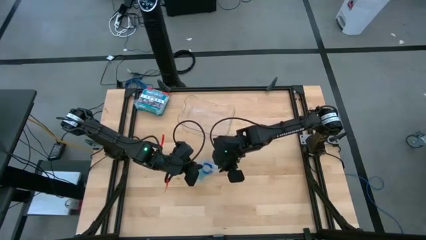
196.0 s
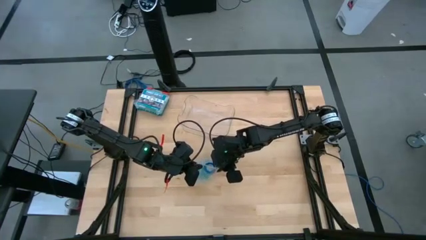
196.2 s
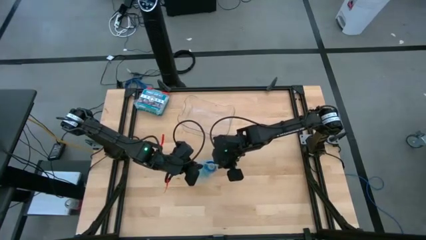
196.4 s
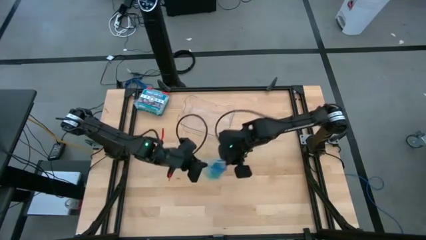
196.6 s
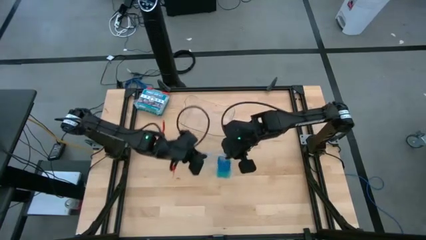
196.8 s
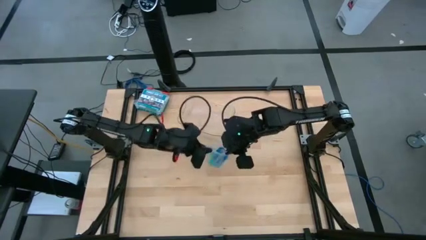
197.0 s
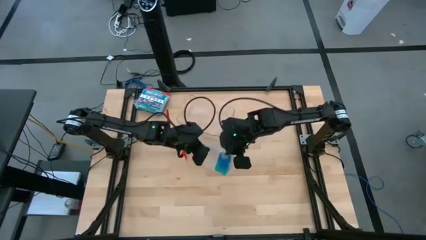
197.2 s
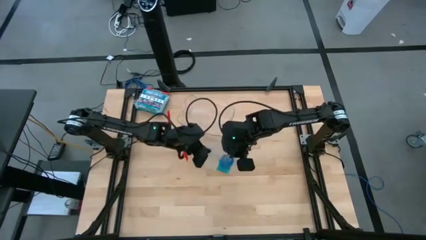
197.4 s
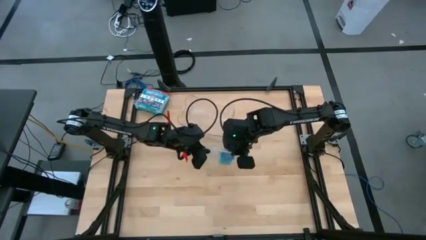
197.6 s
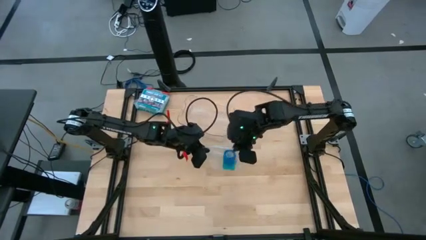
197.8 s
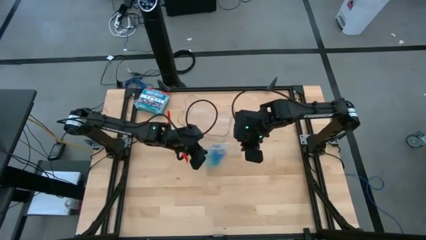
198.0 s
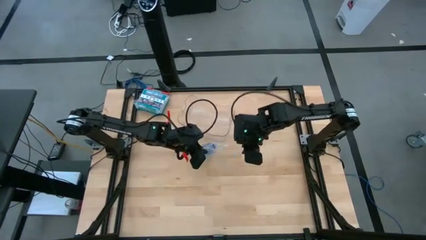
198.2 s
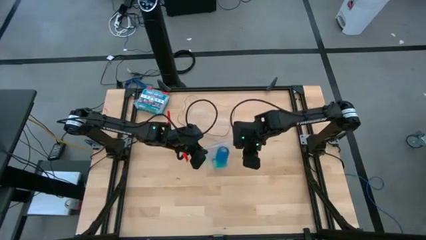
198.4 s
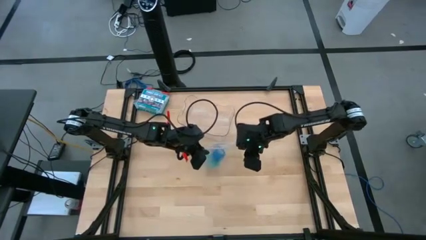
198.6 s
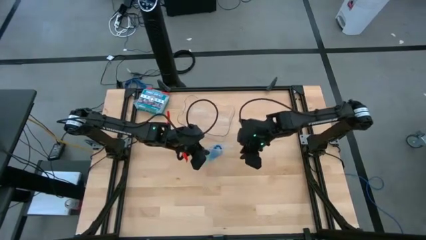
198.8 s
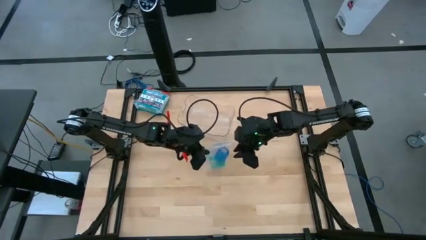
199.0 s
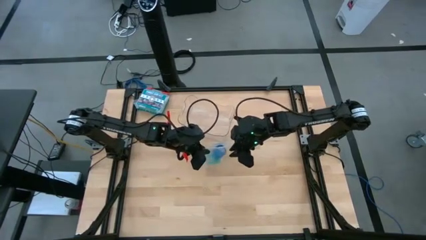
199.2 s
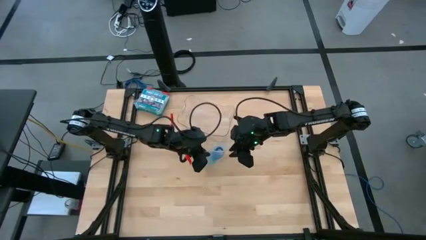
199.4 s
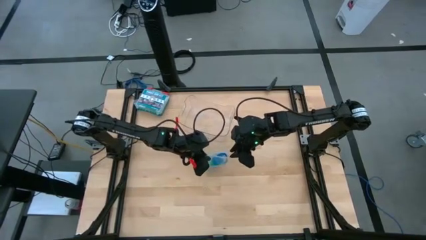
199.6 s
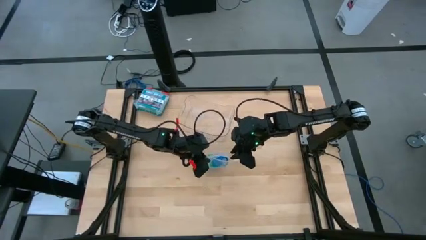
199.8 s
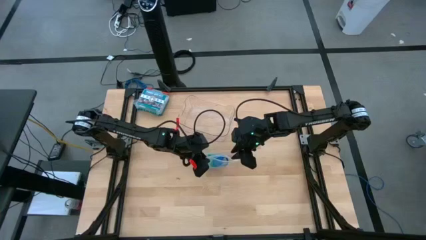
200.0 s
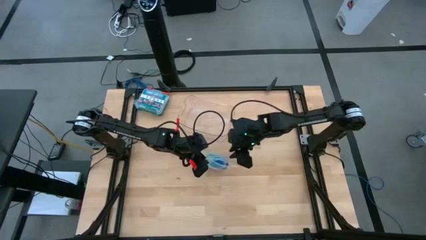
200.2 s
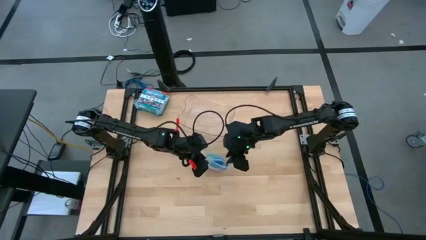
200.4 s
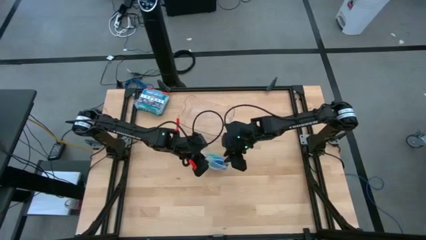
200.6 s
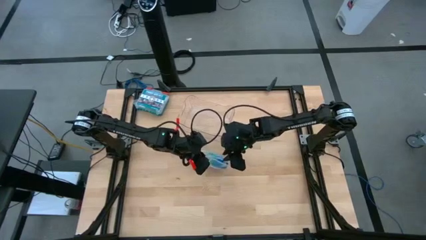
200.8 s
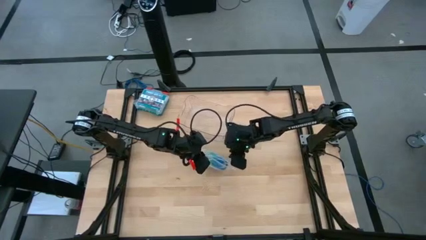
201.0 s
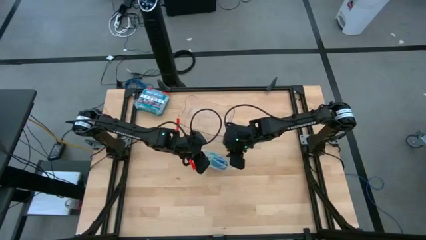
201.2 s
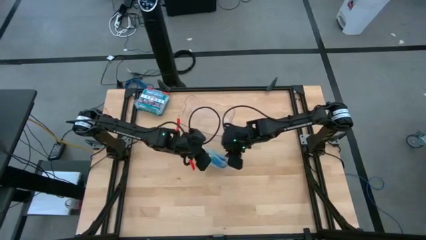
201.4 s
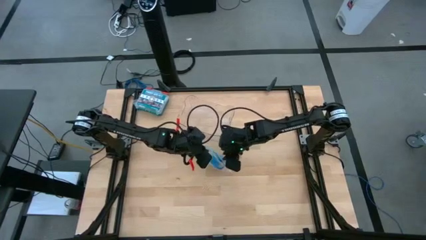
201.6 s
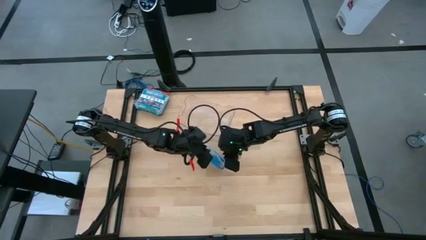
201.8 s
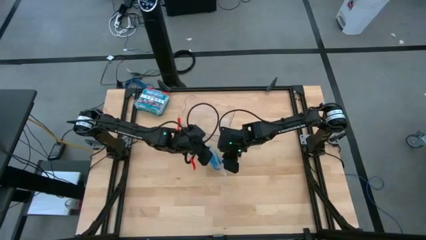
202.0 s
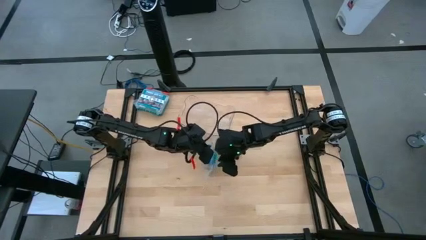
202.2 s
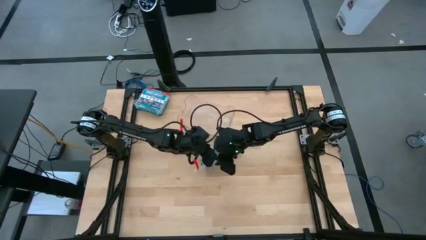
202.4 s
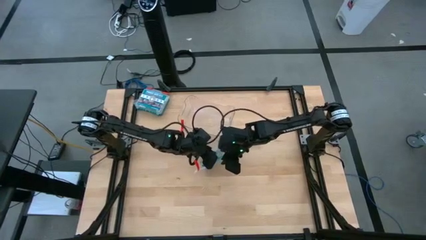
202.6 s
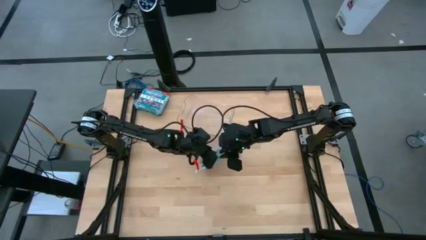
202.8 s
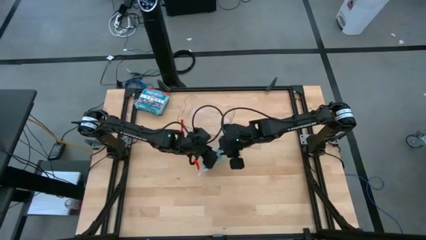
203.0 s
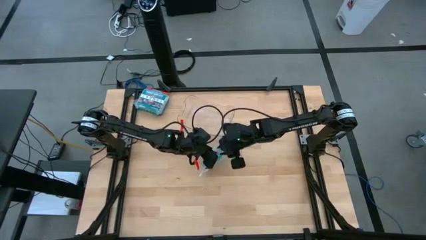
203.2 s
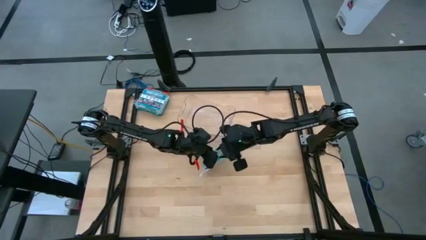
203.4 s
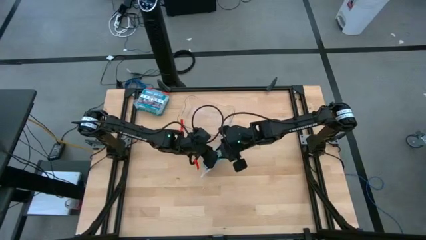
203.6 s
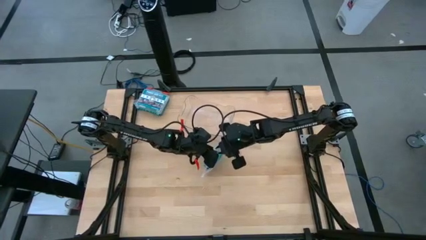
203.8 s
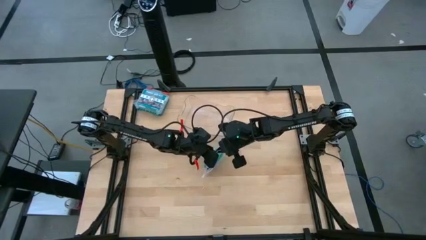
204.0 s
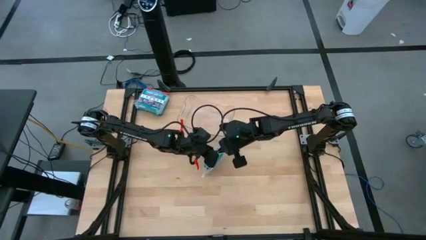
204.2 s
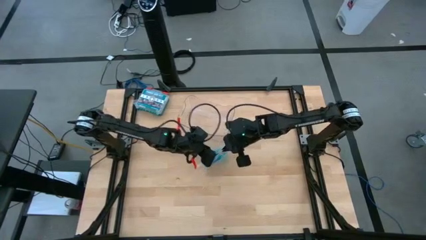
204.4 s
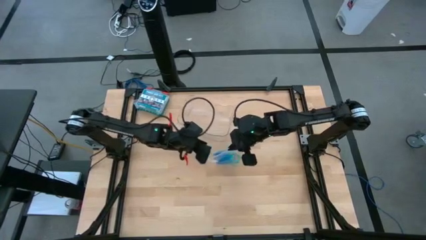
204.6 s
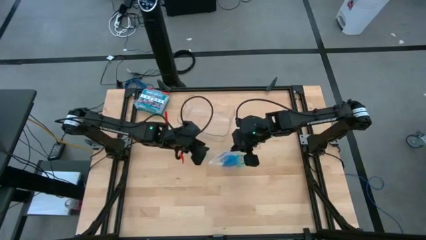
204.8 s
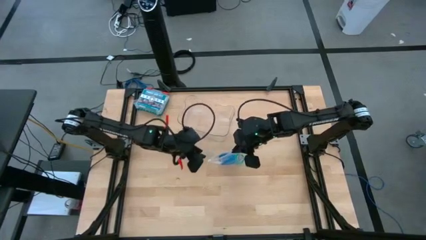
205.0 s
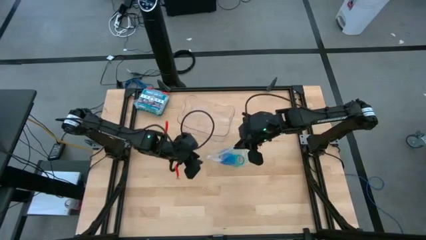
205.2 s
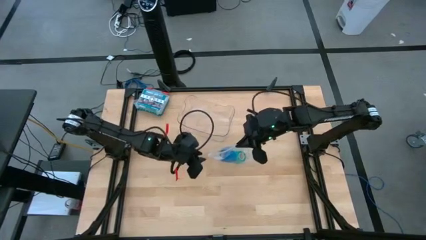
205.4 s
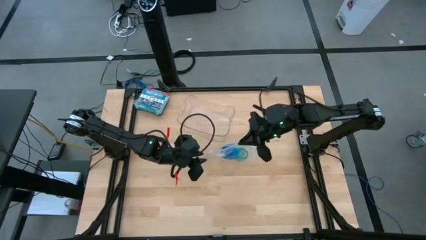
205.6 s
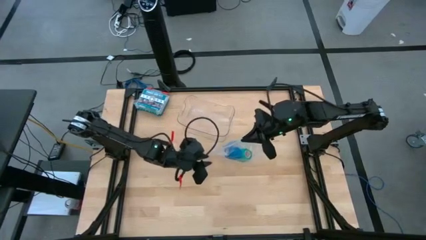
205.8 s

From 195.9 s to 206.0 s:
Task: Roll bandage
Close the transparent zip bag

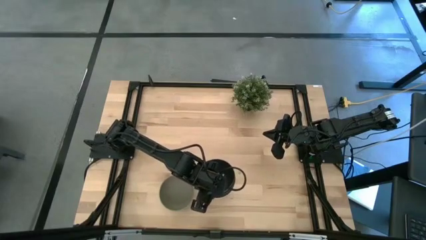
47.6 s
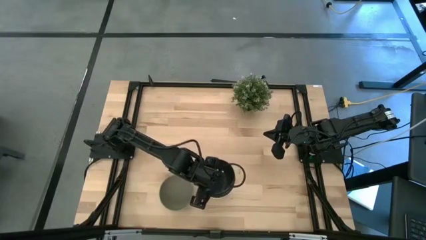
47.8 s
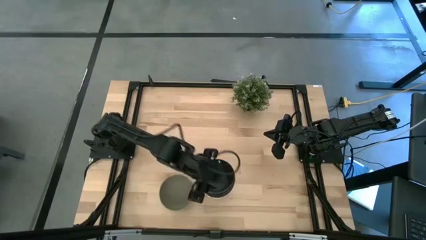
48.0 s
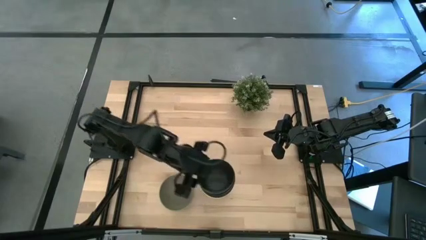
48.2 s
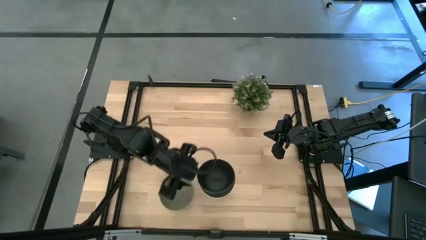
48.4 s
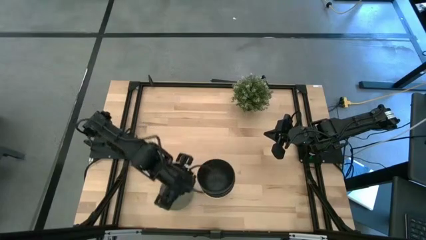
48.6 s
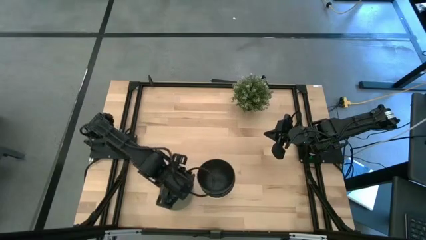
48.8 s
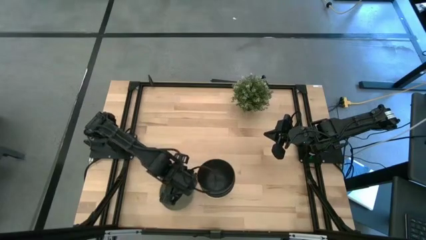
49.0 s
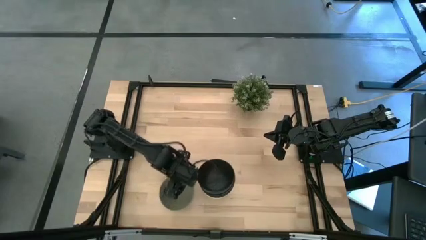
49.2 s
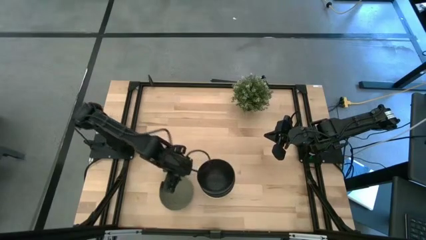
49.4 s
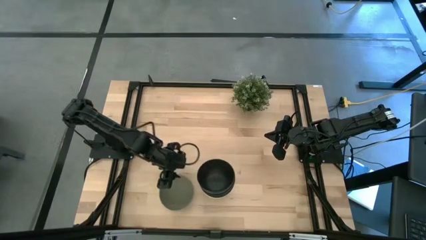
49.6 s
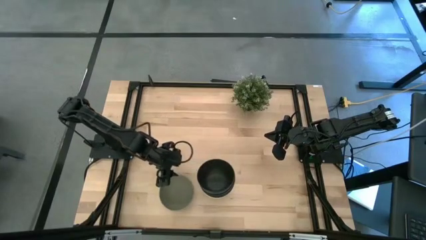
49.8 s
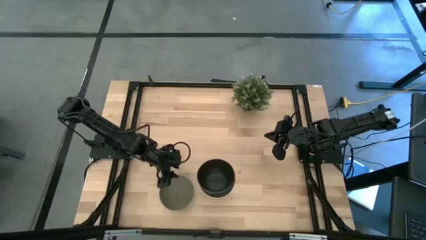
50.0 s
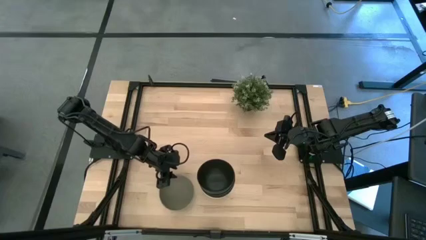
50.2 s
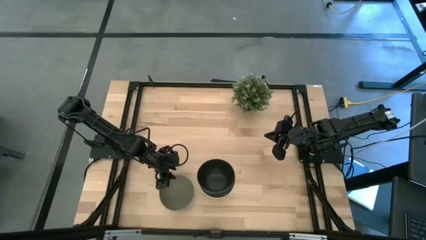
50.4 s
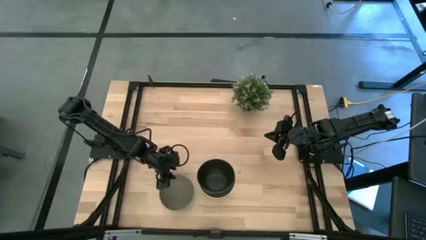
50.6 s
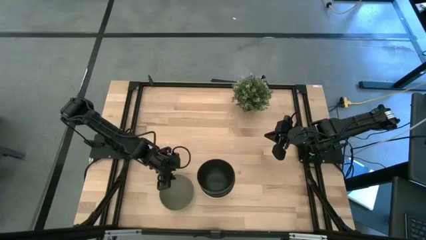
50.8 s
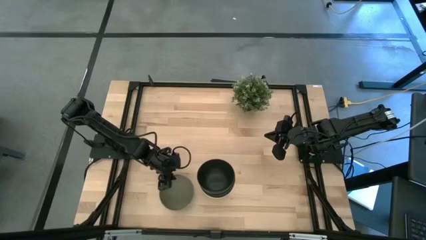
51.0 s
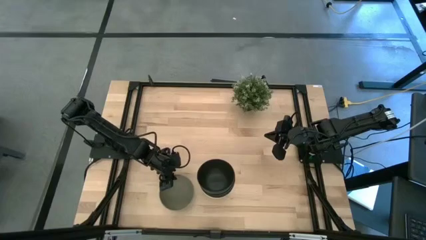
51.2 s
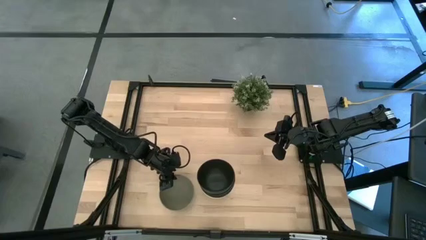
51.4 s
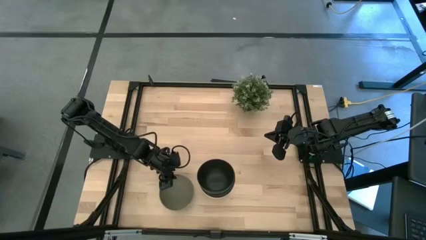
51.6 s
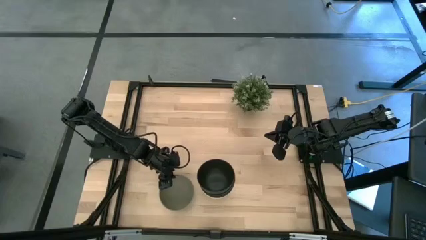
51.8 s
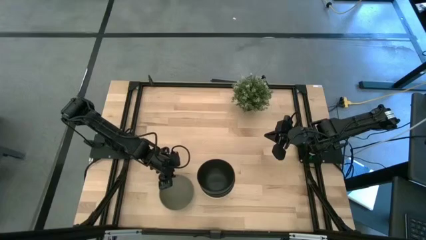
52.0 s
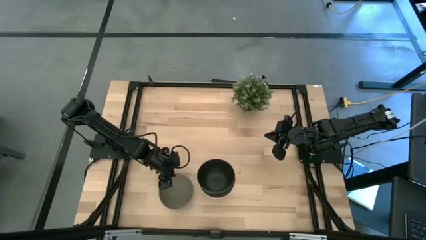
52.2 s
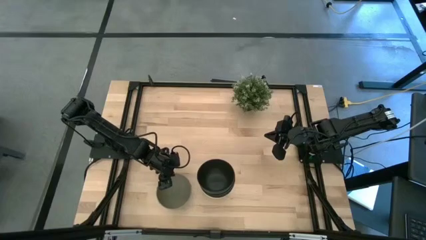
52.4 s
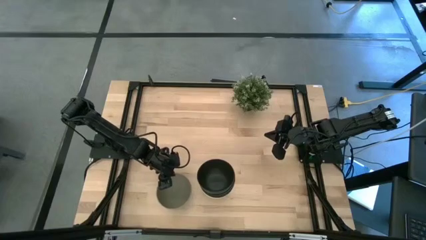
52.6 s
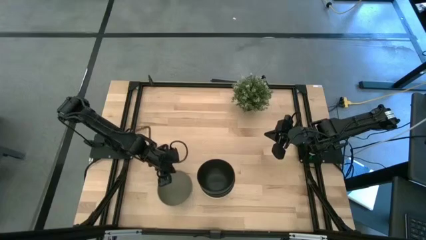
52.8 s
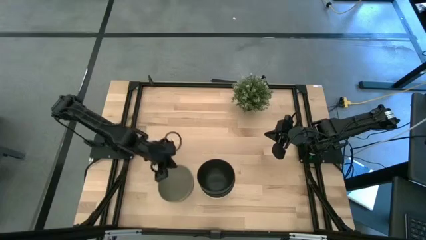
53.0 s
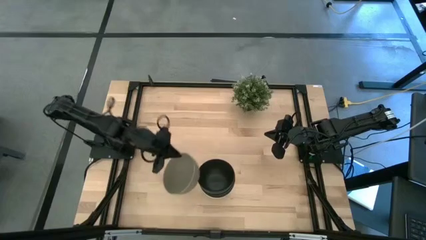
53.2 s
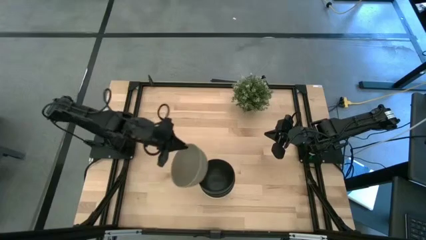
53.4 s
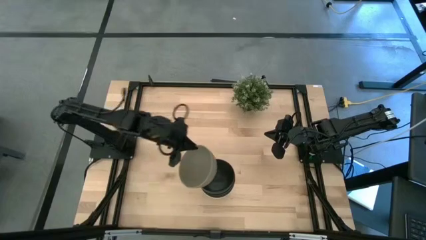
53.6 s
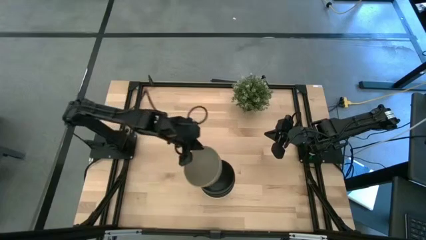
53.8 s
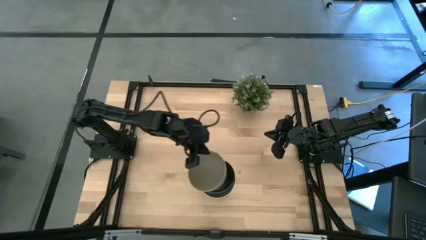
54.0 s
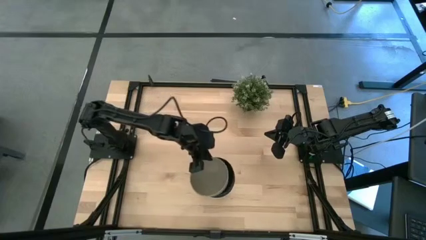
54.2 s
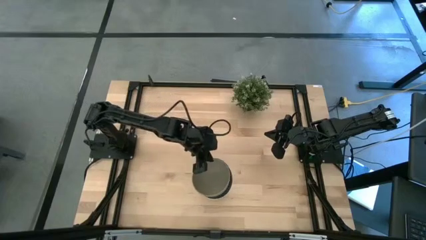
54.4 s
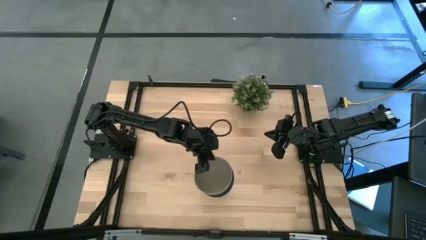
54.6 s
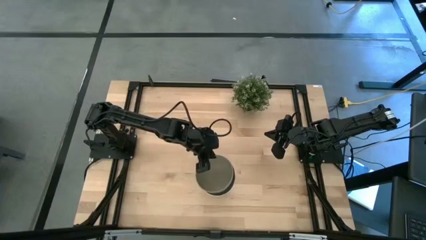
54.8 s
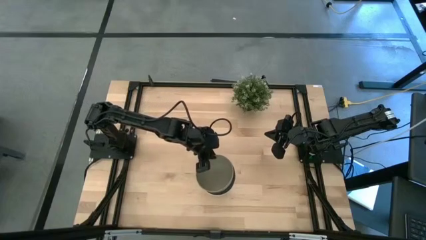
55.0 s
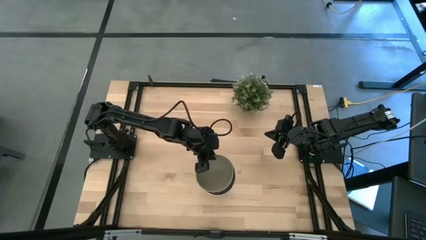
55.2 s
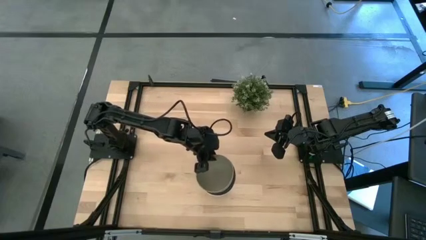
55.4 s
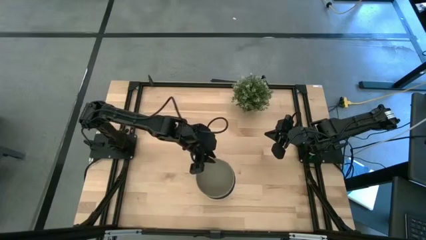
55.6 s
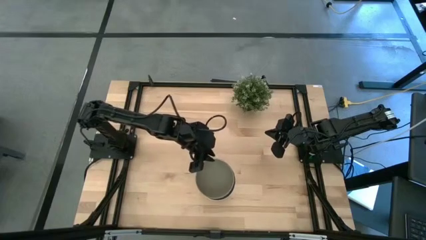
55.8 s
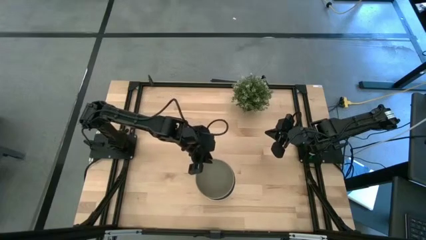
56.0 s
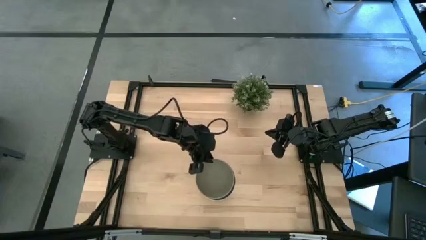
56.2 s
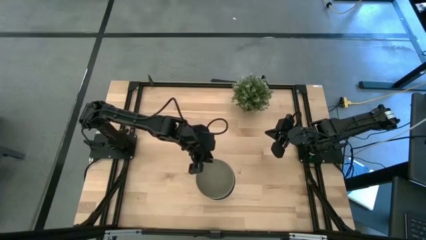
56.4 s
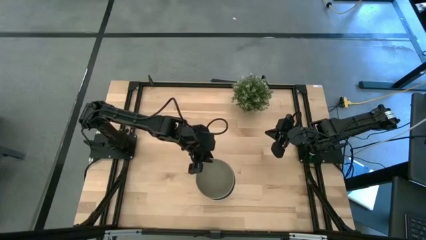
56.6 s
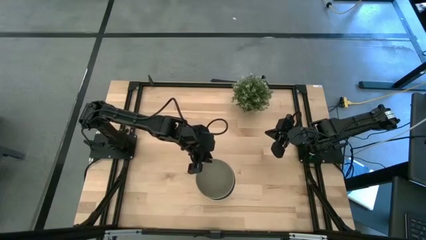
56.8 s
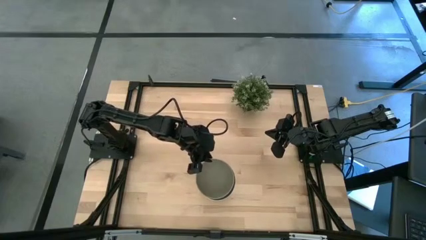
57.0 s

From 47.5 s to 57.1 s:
Task: Nest bowls inside each other
Stack the gray bowl on top of the black bowl
